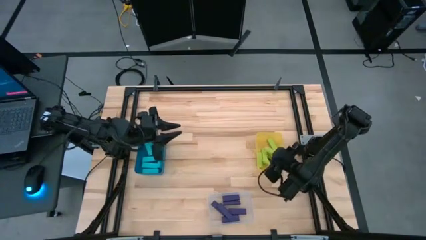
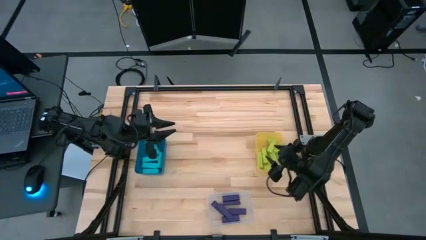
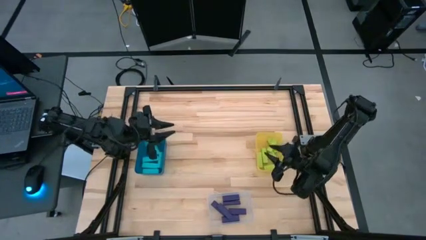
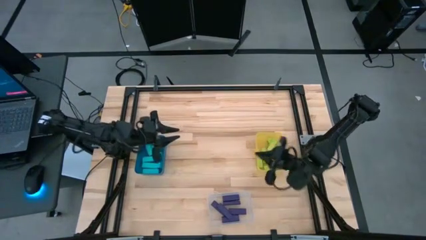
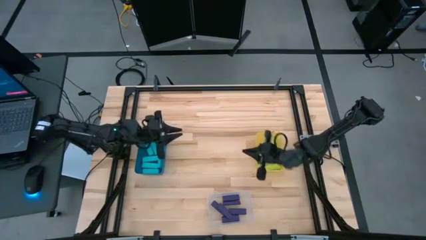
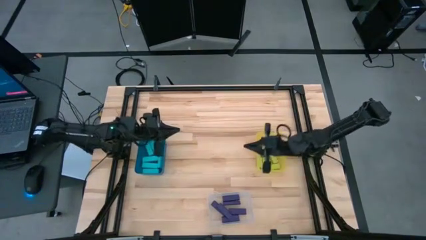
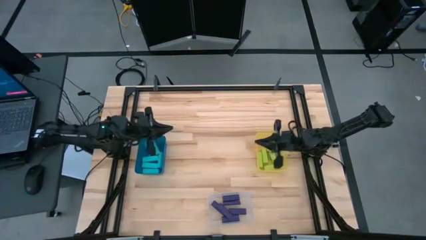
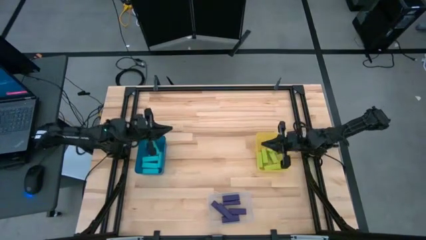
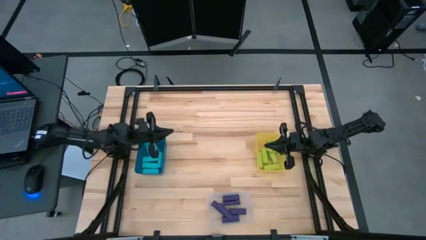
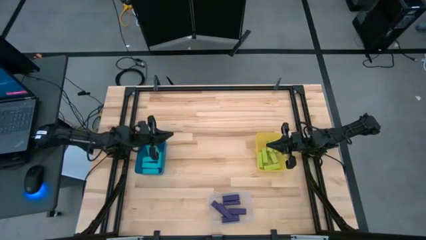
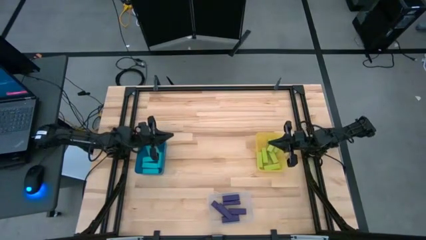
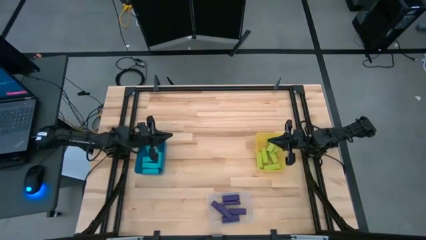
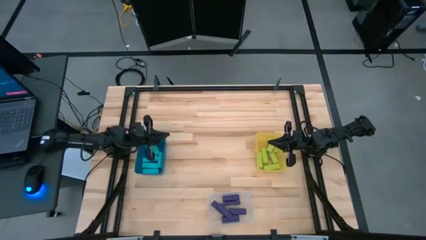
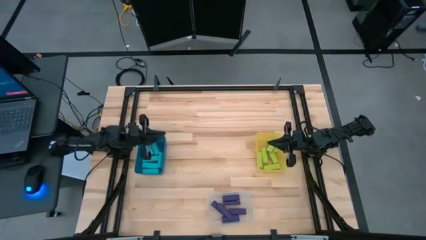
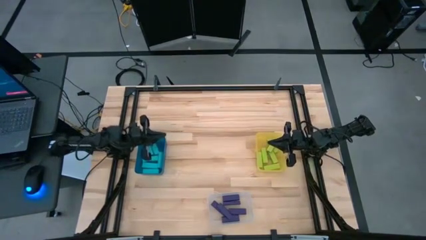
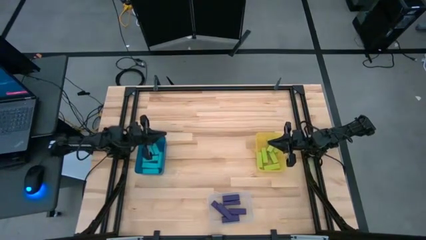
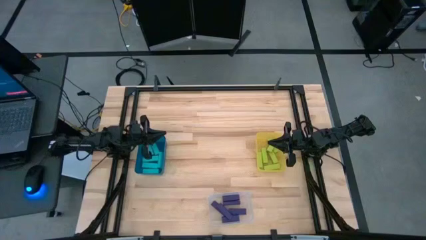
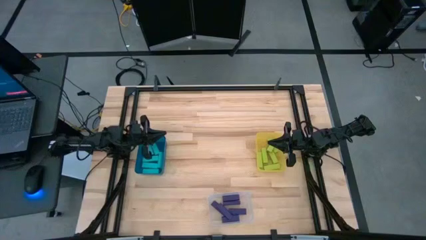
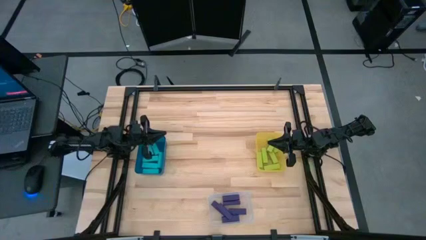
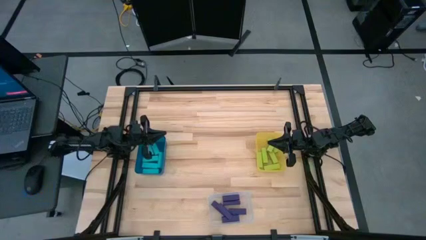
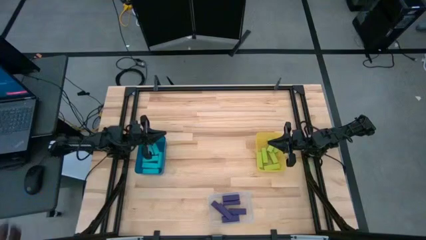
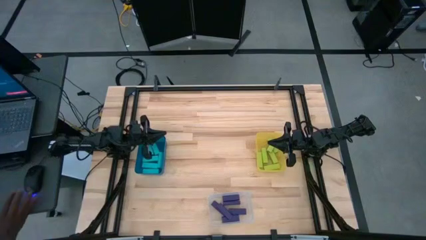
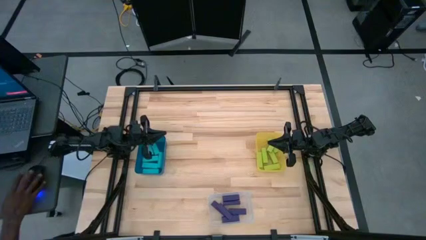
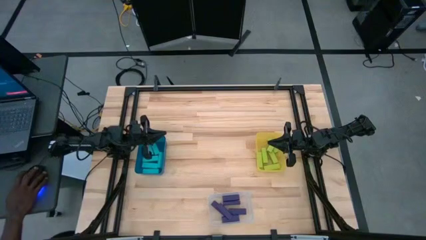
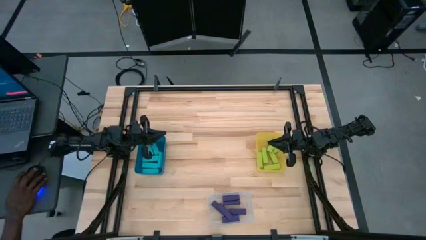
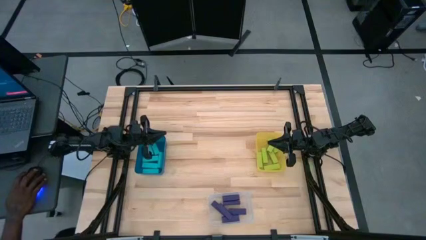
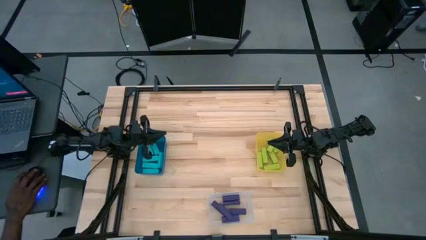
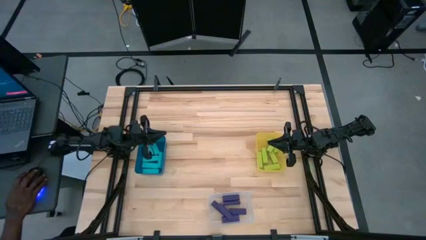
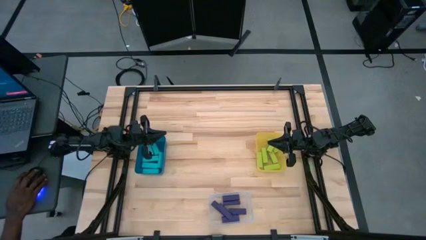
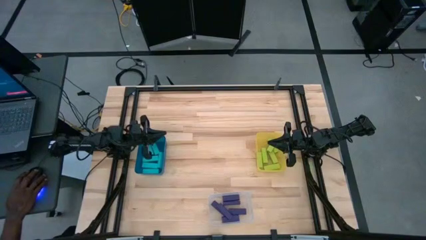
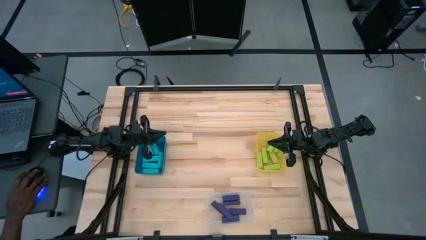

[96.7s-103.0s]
Task: Sort blocks
Return to Home Position

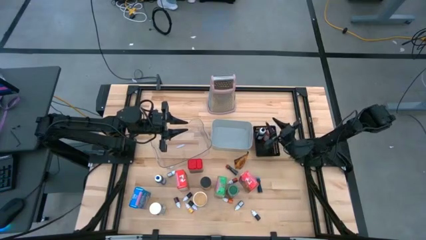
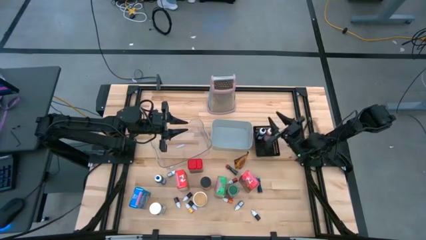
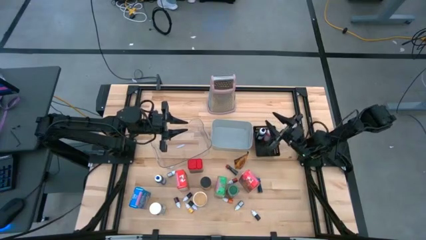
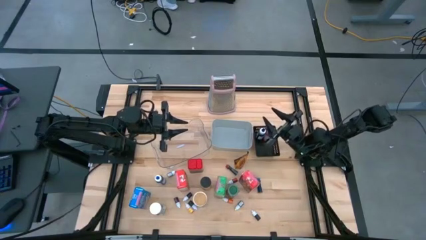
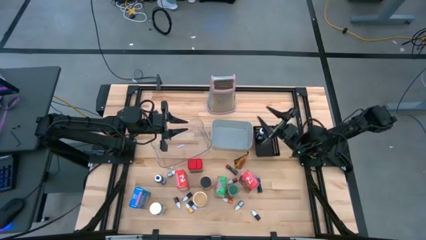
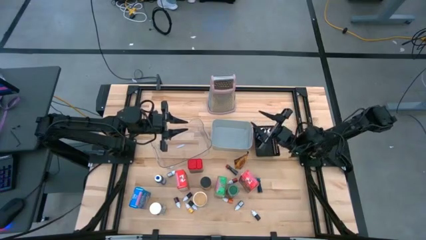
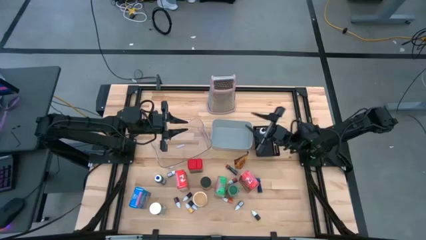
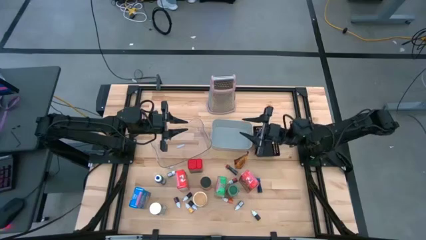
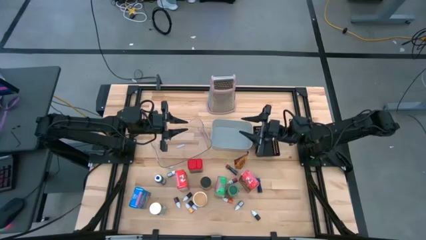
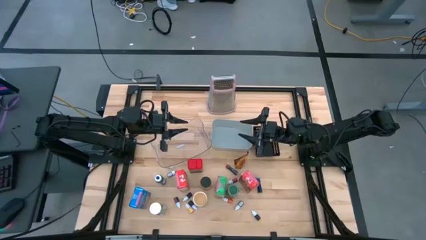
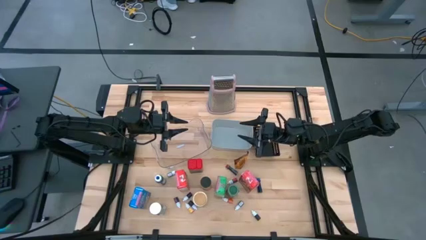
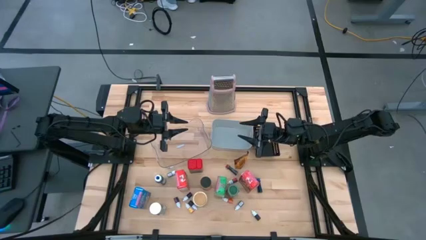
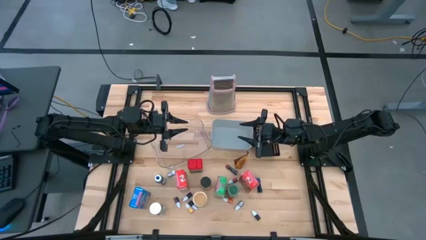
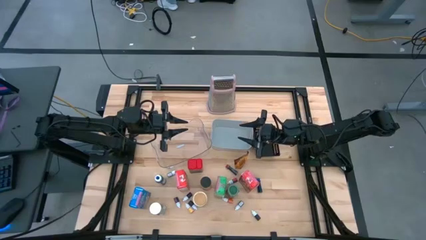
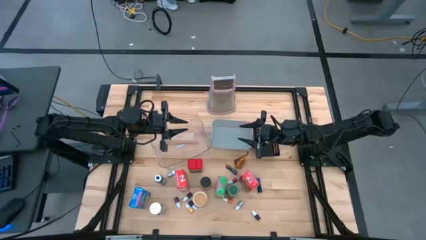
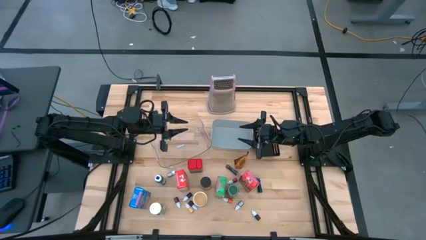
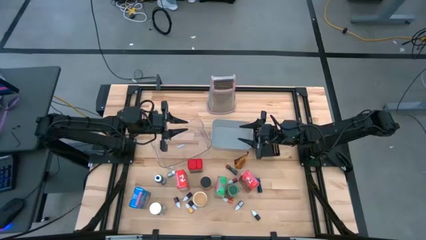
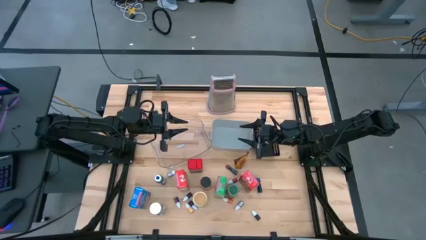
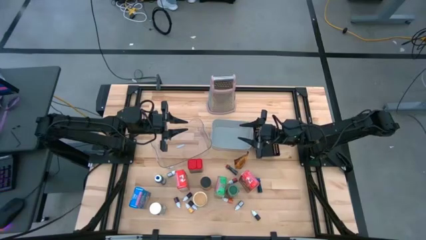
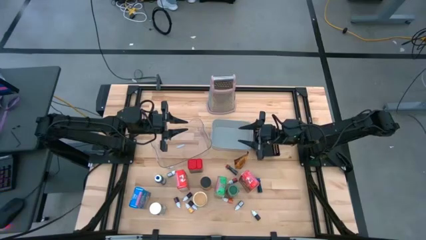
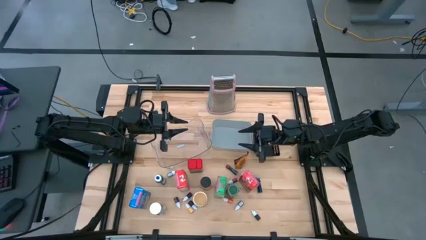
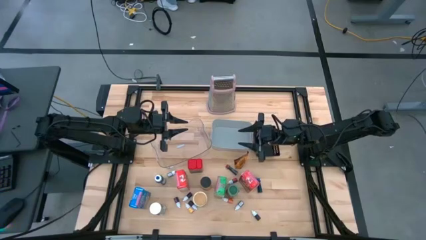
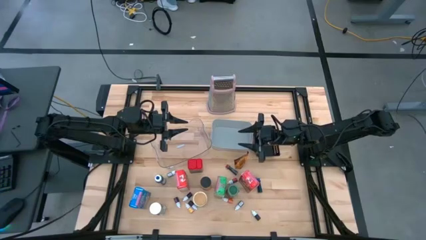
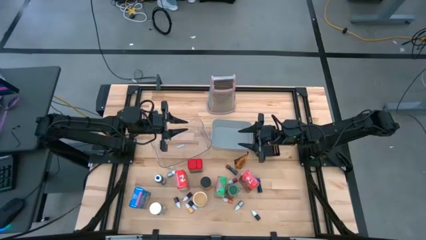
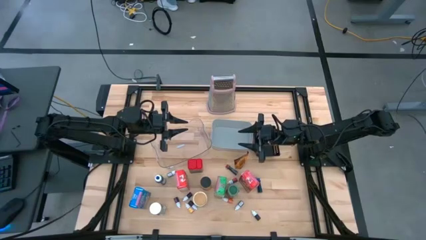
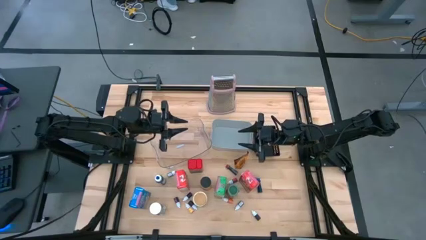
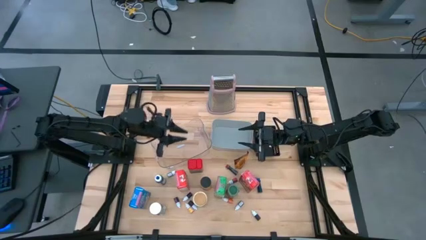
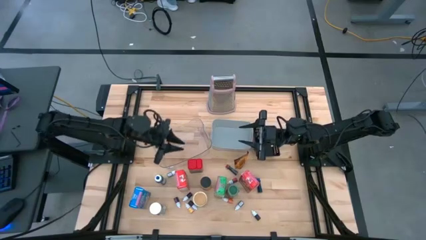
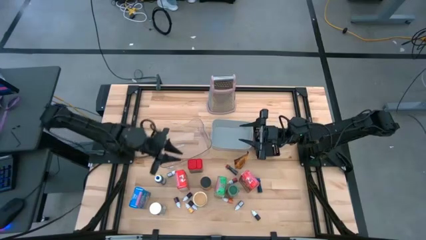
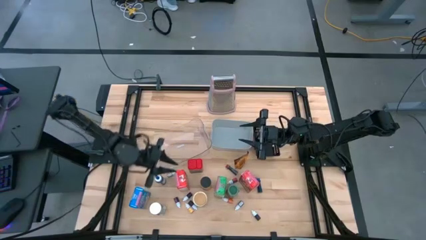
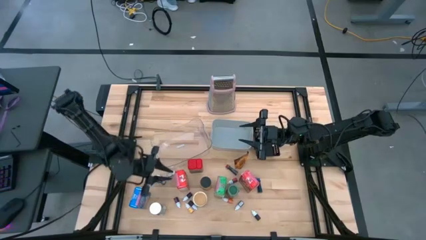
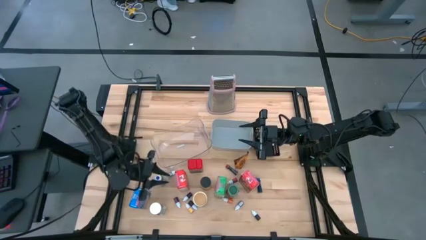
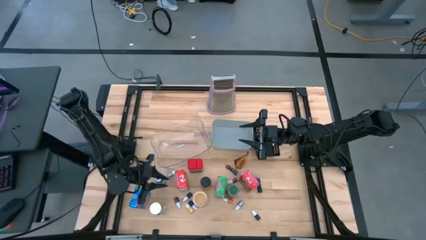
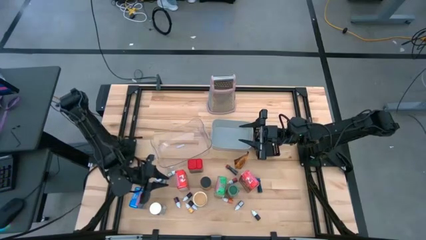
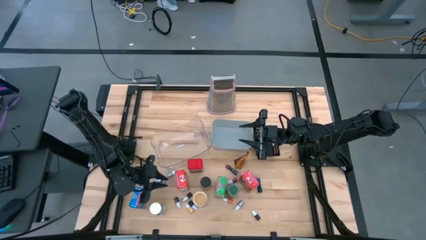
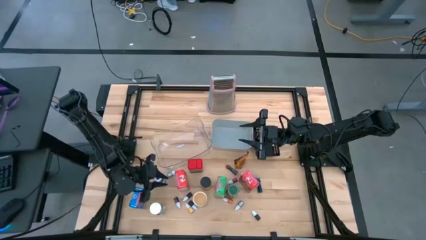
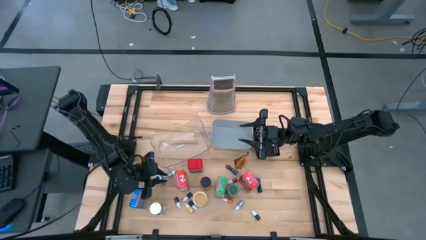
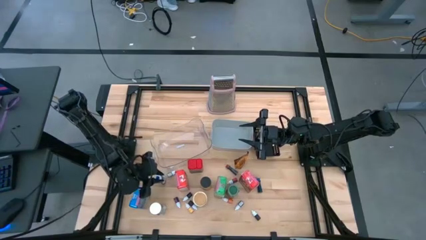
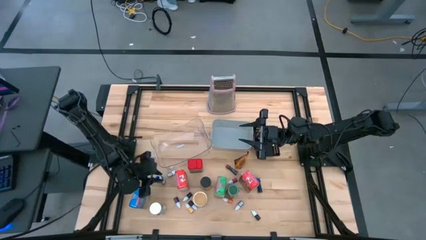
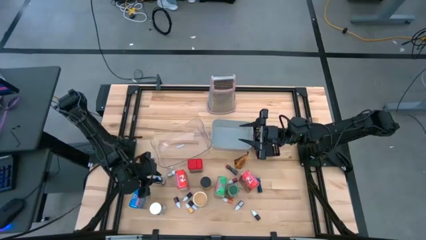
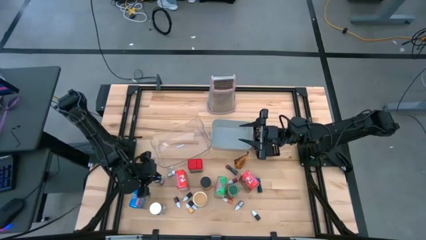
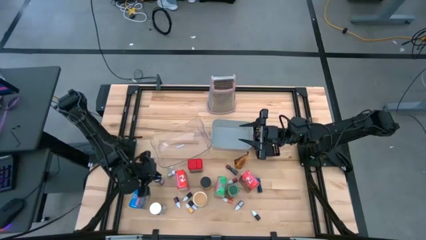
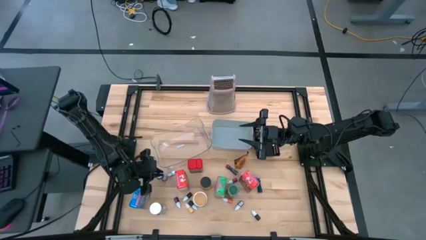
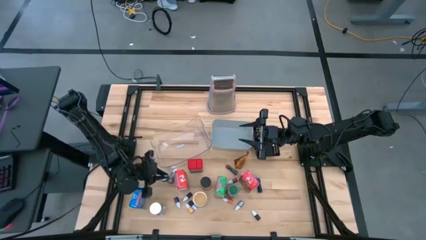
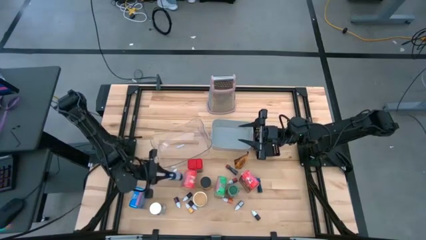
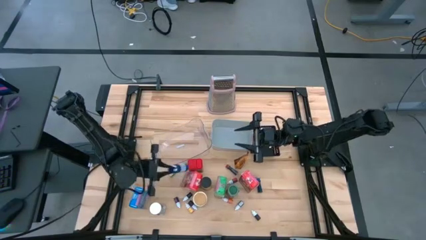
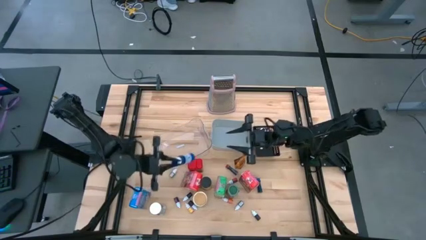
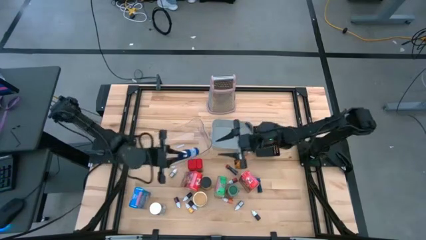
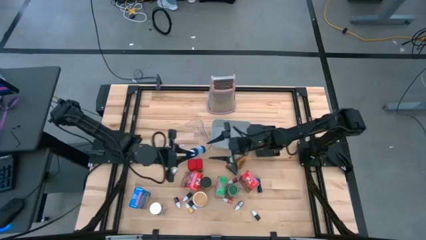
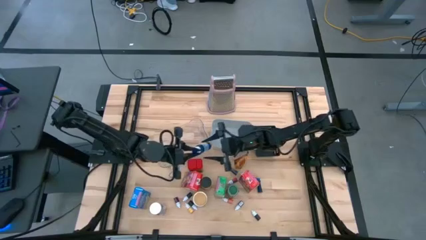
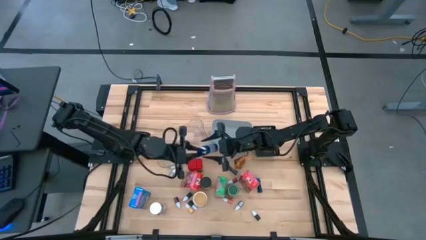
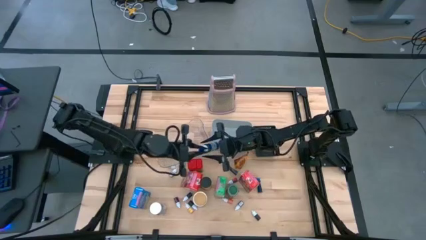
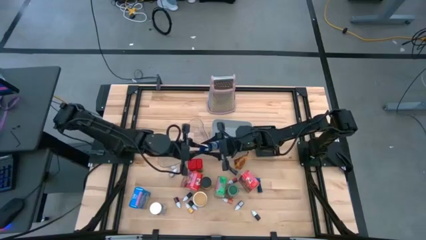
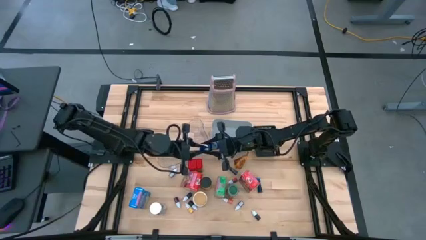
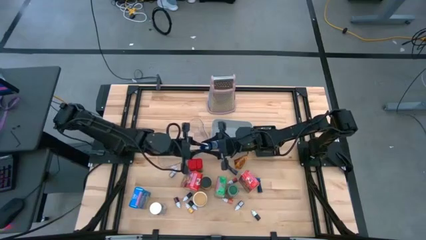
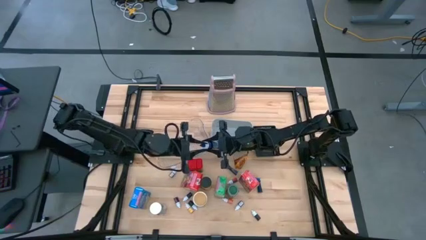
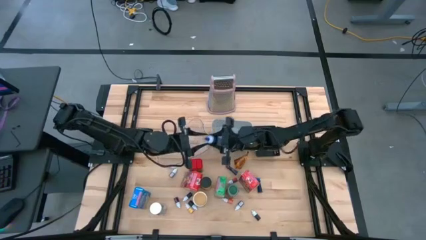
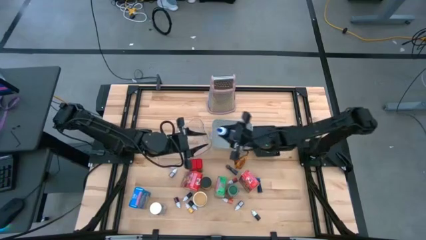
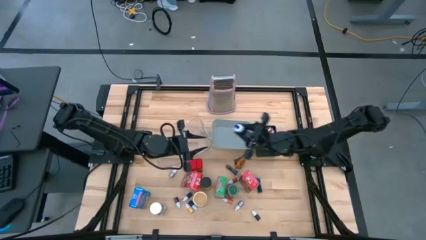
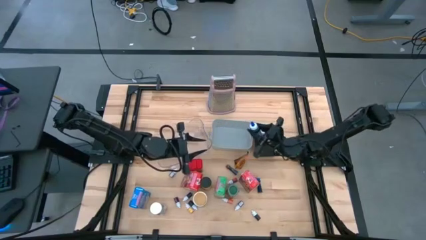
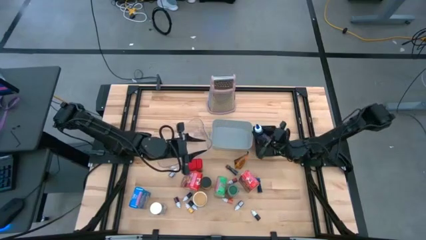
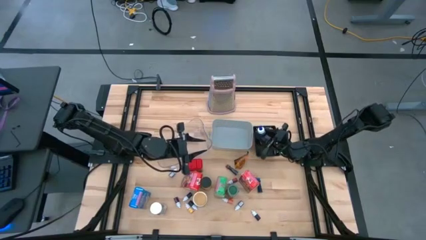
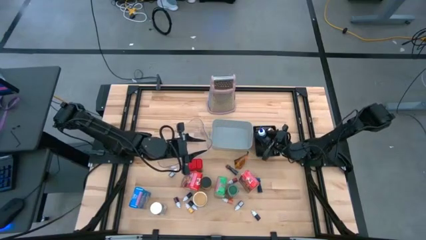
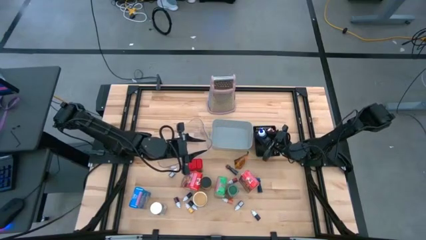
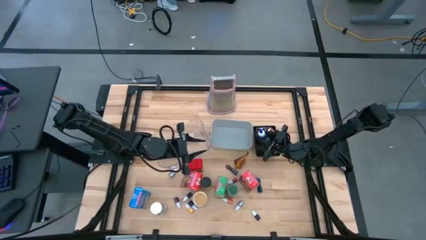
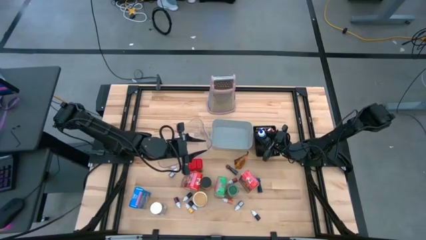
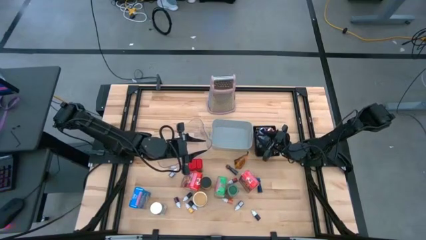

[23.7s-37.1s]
Task: Pick & Place Kitchen Items
Put the large blue food coloring bottle into the black basket
